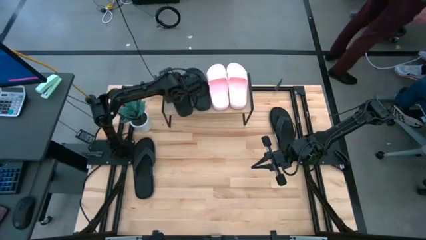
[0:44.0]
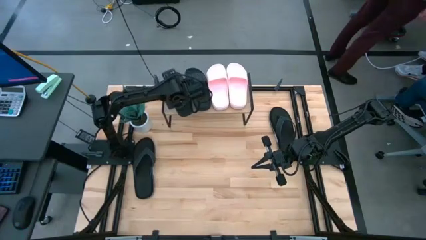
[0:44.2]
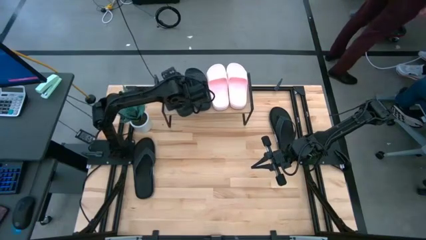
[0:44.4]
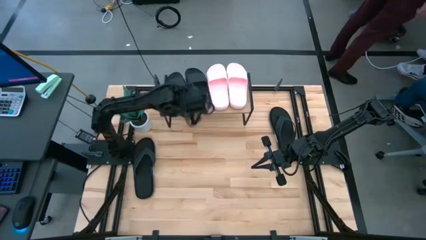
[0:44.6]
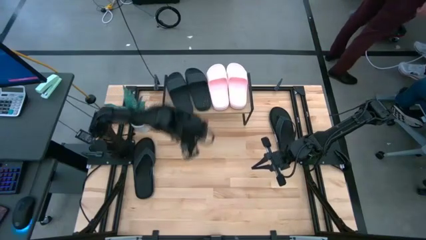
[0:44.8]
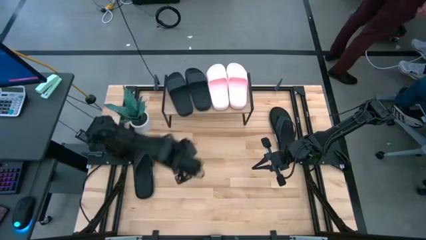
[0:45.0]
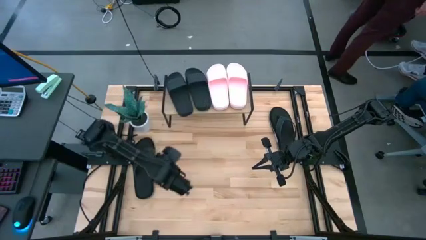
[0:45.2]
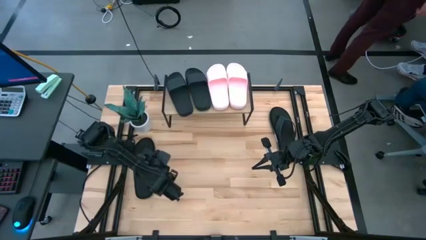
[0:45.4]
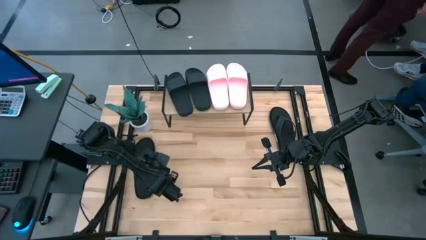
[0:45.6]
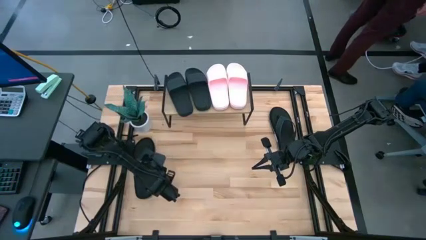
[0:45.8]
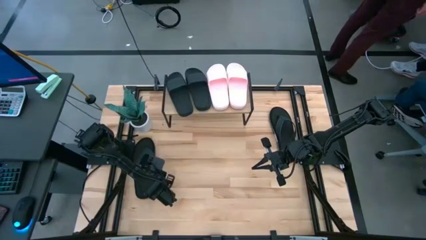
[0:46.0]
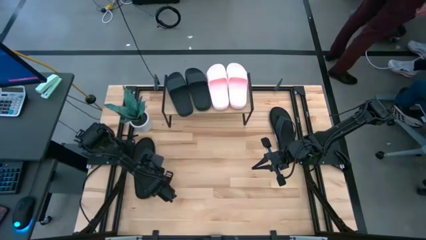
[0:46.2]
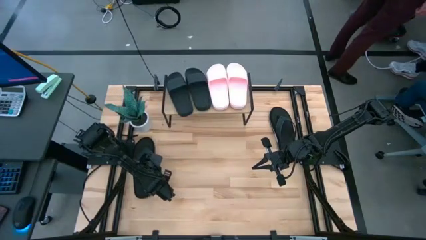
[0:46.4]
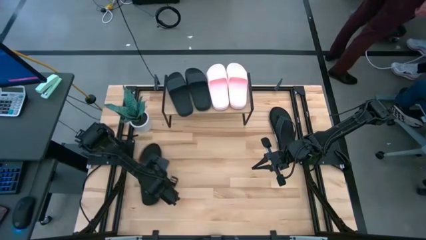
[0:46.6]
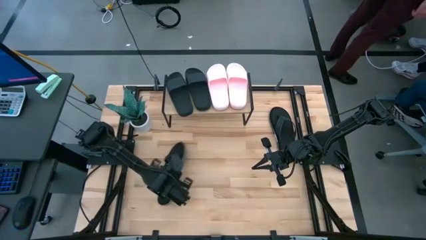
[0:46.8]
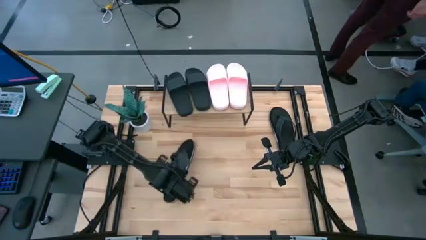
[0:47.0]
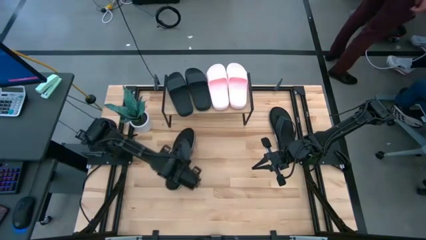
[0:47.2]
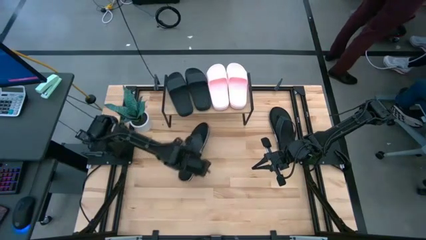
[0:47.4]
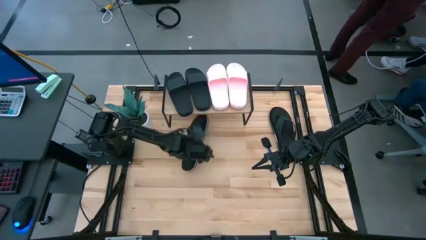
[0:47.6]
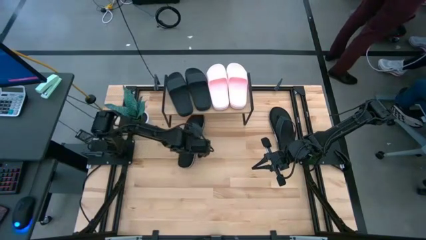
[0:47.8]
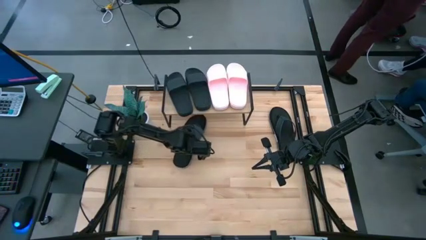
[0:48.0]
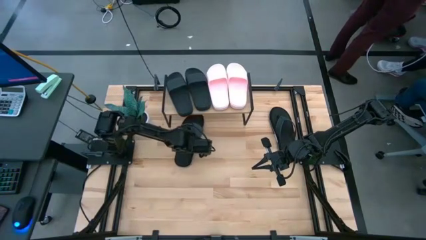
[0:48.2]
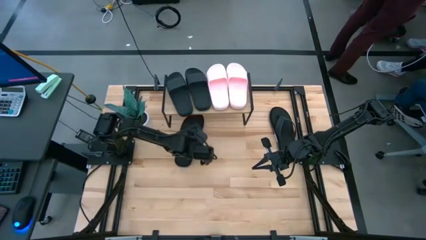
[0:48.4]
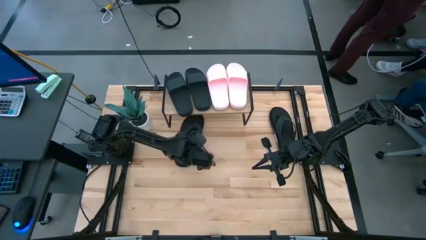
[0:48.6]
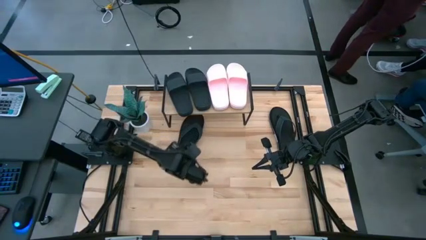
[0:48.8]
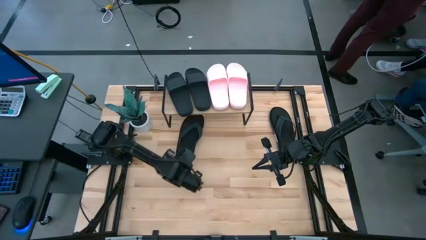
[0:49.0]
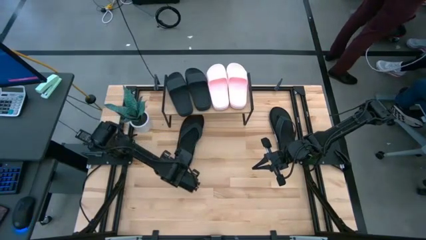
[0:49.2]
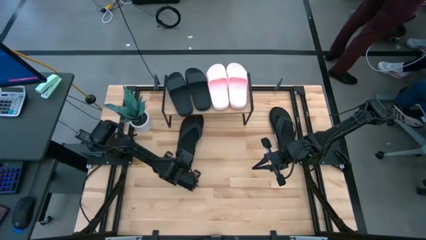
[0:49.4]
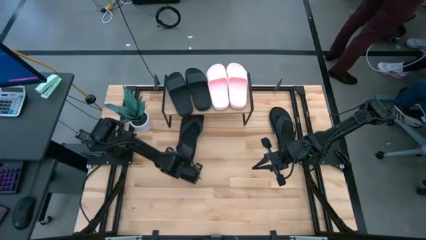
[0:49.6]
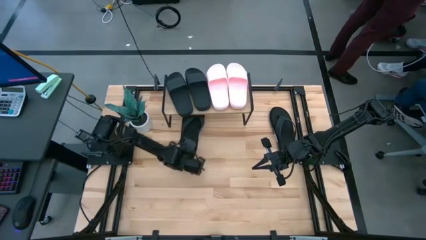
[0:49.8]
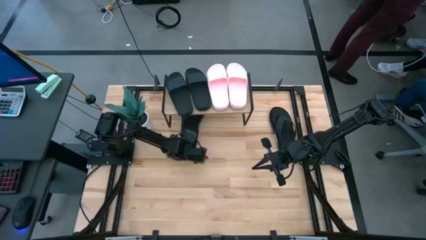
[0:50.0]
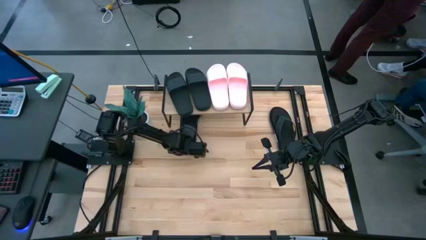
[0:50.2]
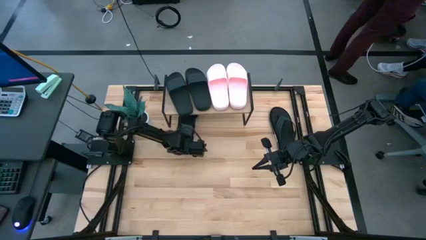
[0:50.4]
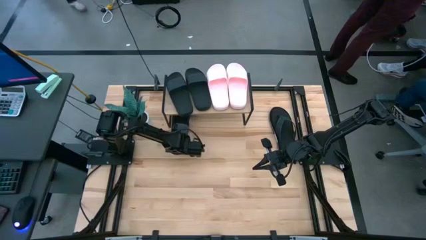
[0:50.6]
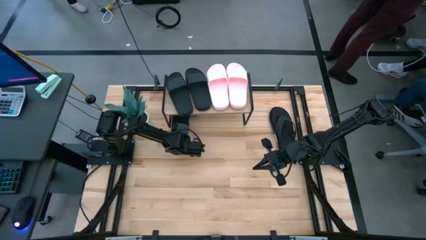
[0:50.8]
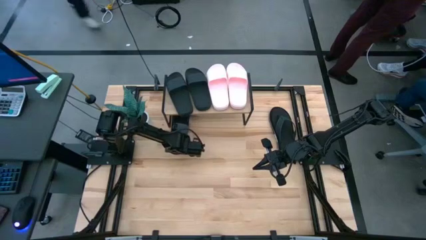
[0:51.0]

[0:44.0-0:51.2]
Task: Pick and place slides into the shelf
Put the left black slipper under the shelf

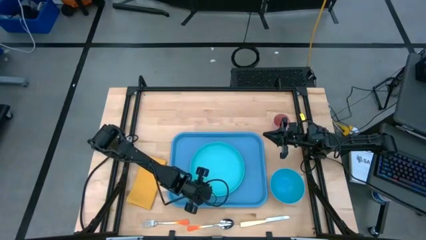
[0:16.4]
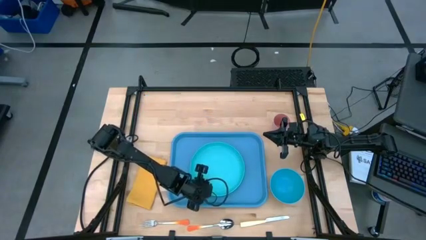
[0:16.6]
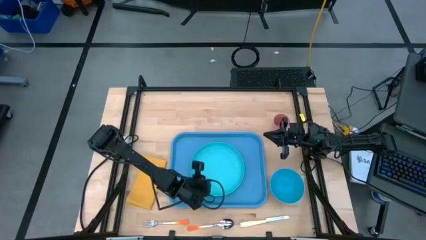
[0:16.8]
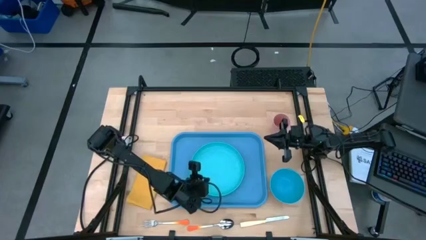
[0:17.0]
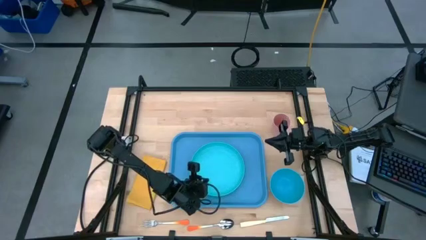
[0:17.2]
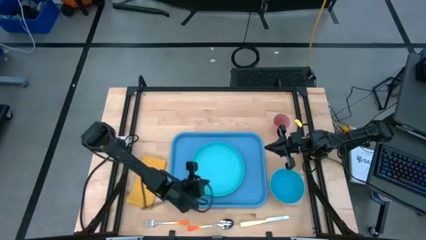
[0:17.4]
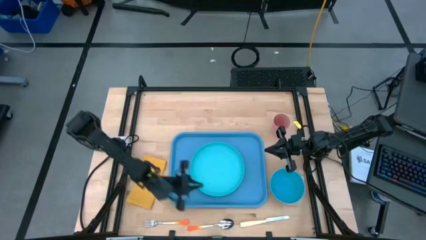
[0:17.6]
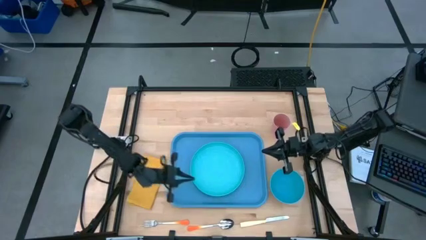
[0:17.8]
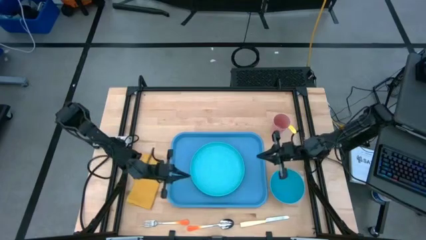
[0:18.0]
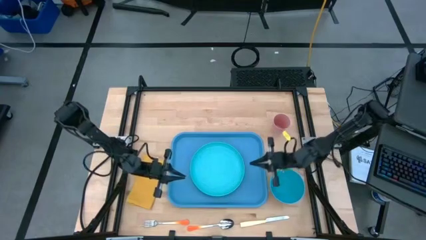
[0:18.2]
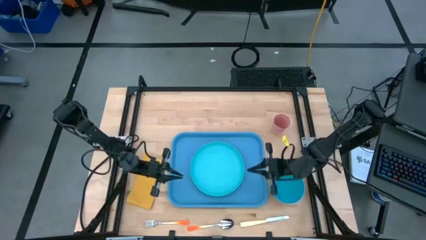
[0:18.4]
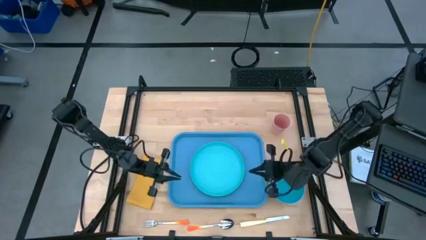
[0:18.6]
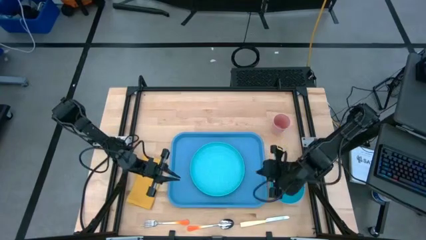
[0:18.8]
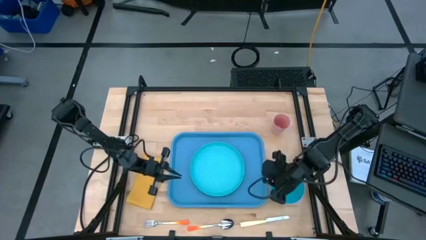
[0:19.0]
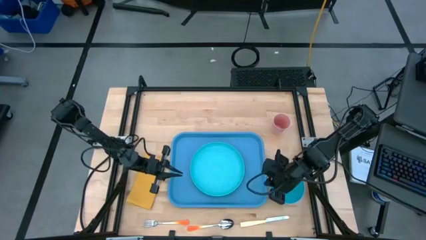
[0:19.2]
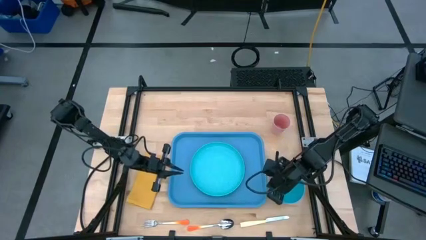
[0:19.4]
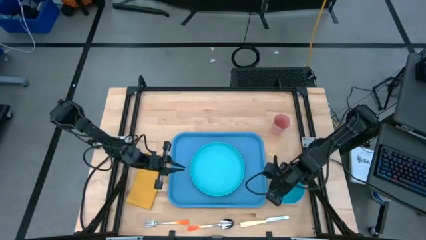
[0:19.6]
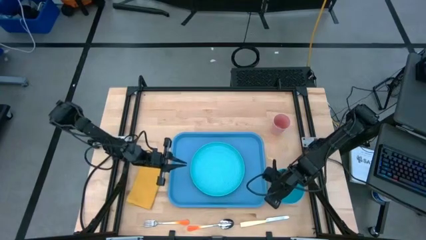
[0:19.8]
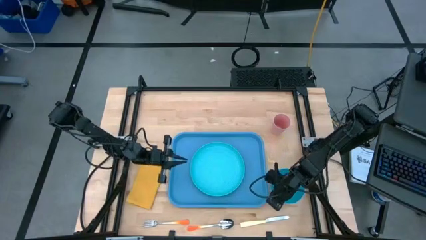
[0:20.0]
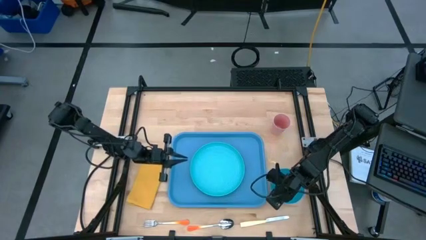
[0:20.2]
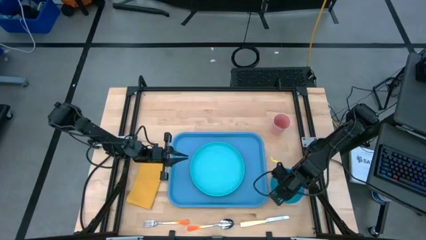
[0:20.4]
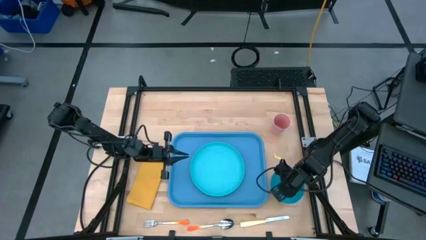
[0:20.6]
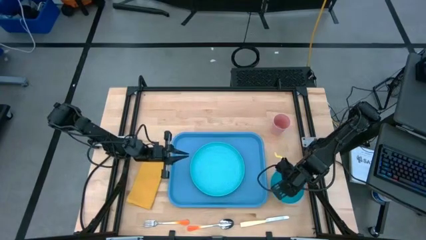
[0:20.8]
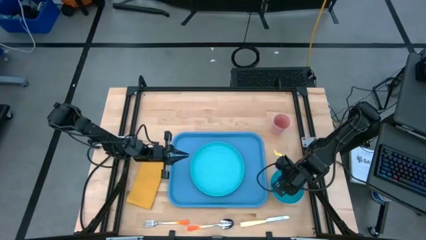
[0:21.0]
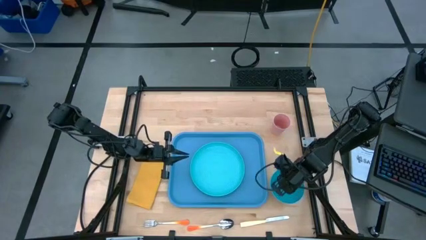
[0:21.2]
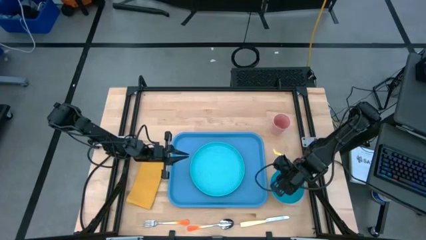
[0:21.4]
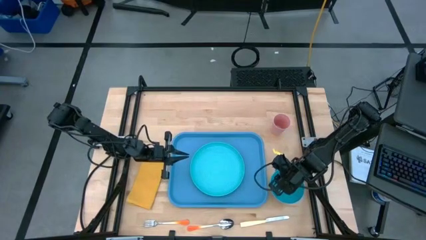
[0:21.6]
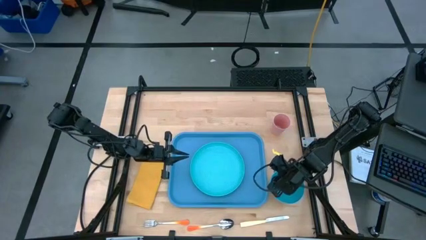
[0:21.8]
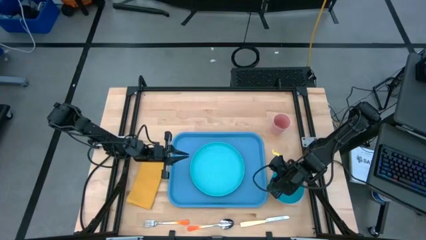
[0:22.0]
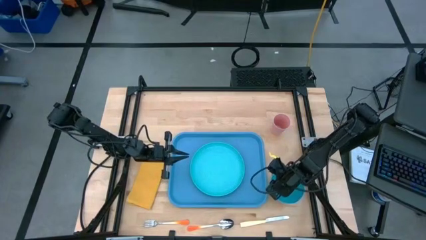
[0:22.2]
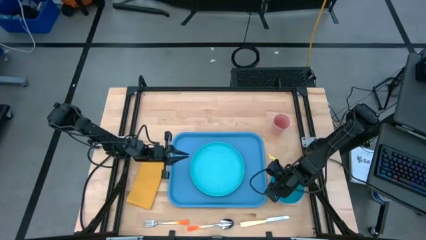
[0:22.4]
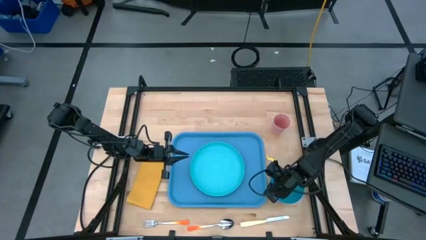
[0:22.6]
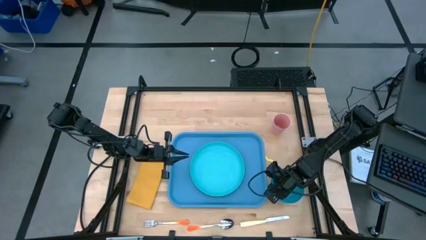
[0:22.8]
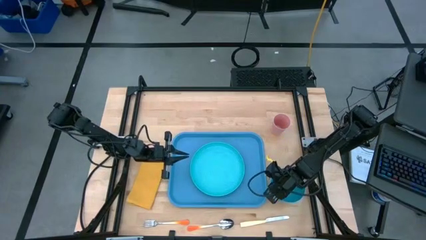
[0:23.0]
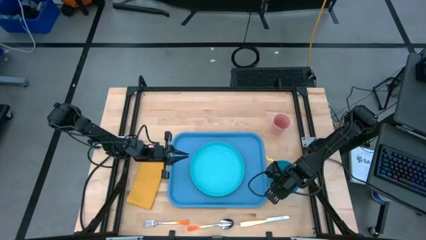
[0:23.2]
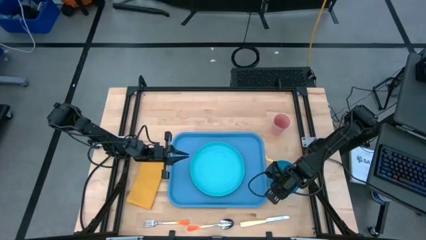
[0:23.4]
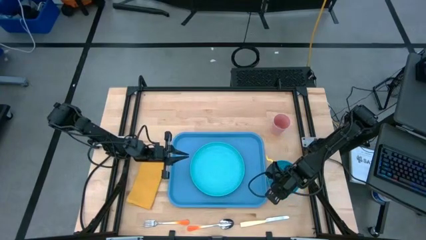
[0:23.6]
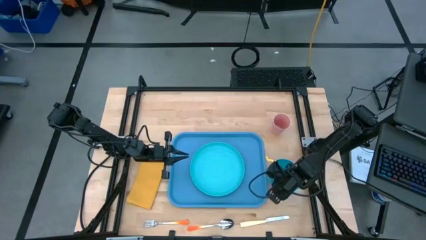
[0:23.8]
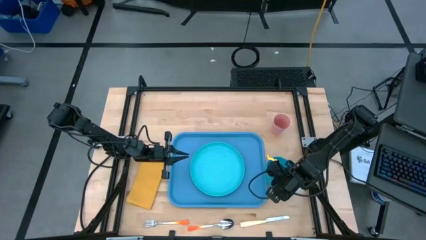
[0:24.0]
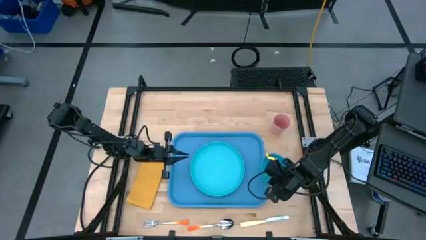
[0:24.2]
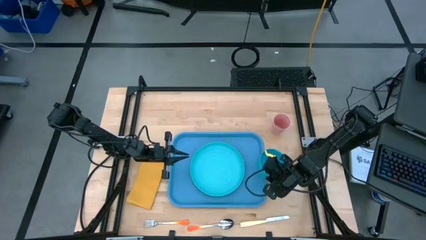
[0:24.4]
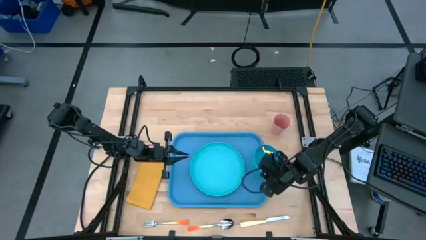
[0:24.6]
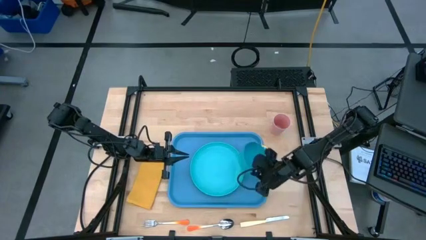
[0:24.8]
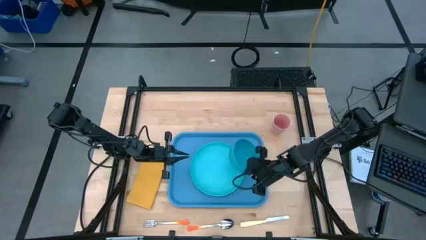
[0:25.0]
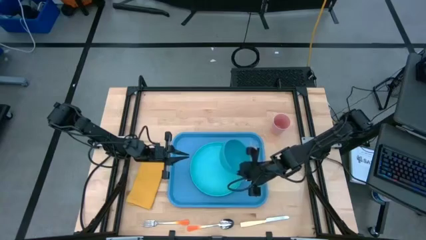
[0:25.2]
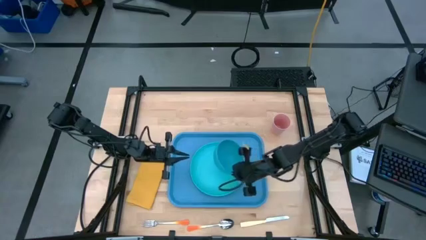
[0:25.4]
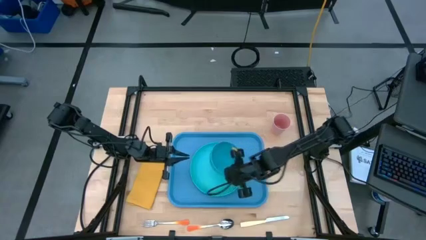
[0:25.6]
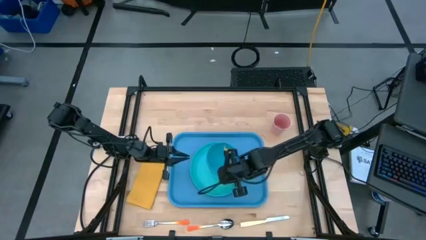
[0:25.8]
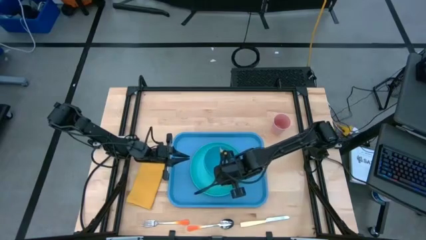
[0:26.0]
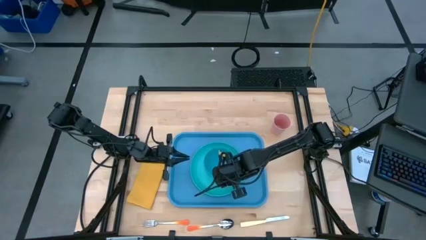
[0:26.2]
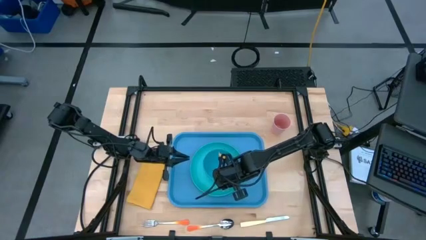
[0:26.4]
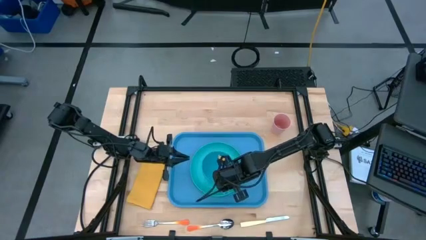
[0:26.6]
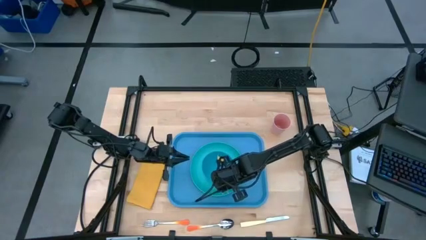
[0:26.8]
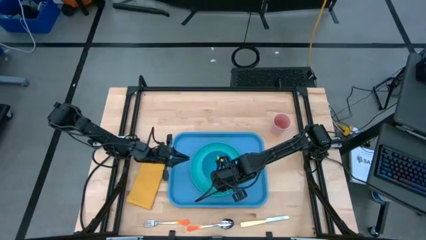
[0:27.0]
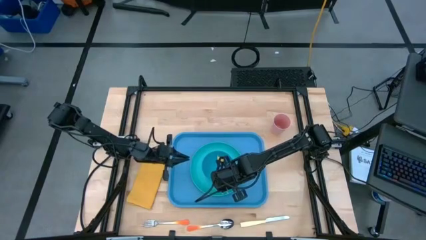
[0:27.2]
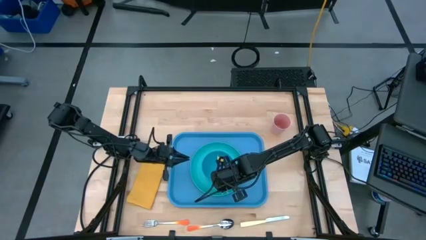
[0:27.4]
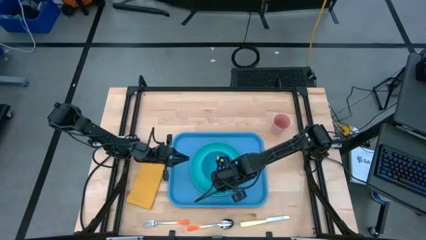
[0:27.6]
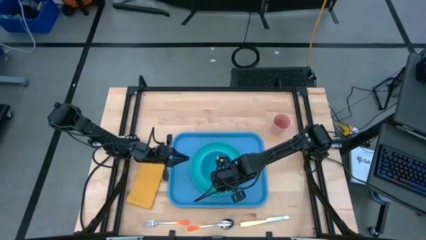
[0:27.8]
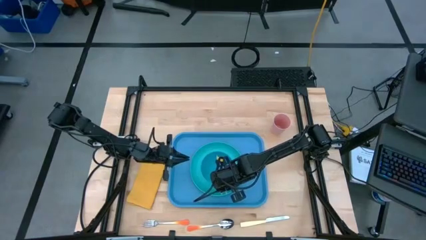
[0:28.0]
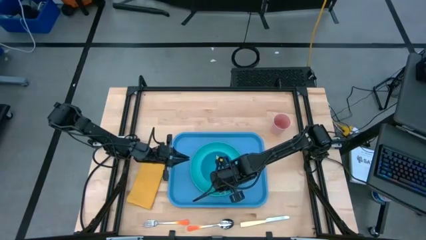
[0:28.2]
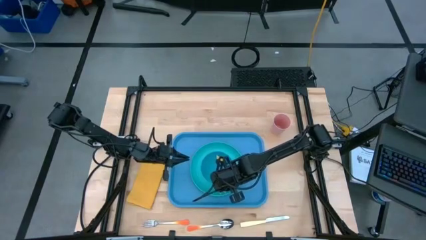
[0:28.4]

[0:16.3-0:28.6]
Task: Set up tray
Put the blue bowl on top of the blue plate on the blue tray
